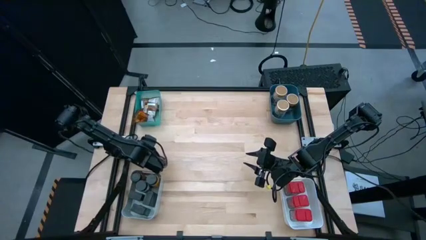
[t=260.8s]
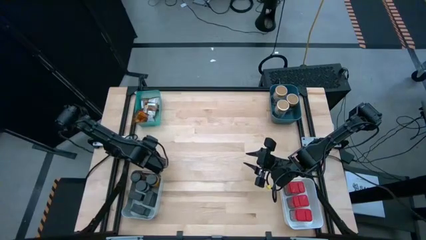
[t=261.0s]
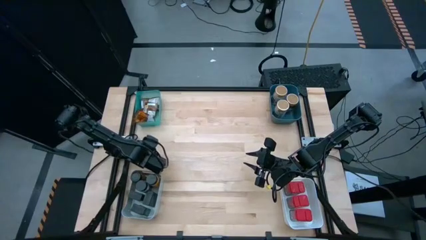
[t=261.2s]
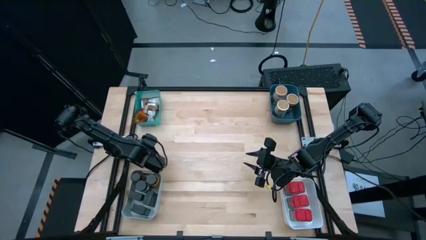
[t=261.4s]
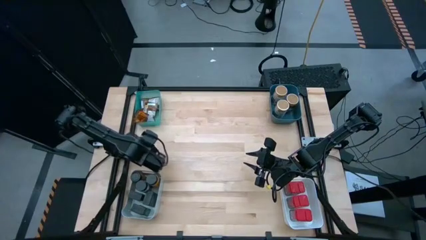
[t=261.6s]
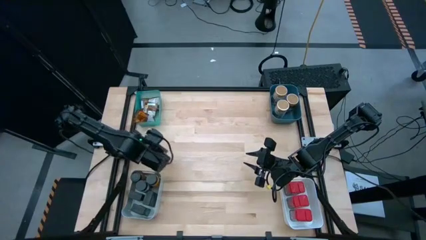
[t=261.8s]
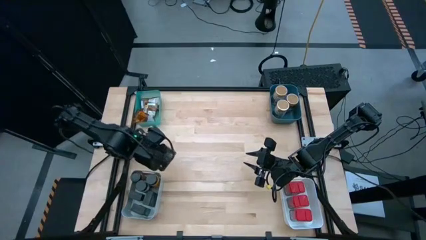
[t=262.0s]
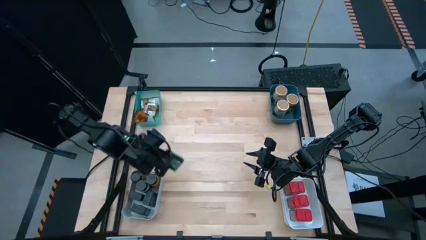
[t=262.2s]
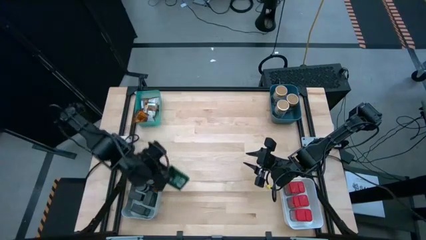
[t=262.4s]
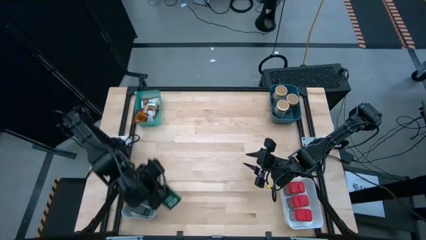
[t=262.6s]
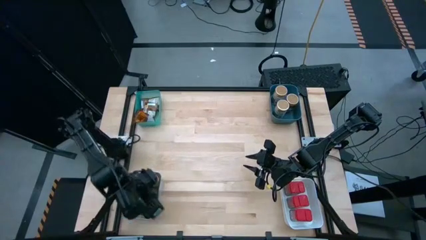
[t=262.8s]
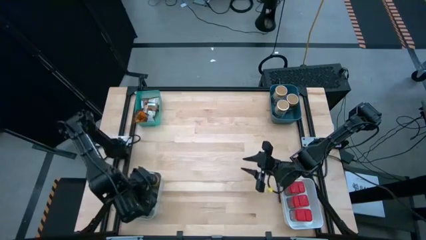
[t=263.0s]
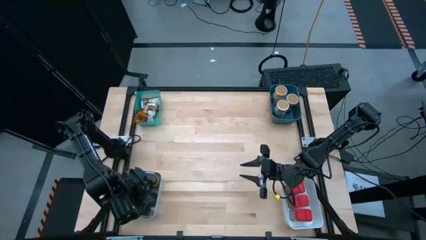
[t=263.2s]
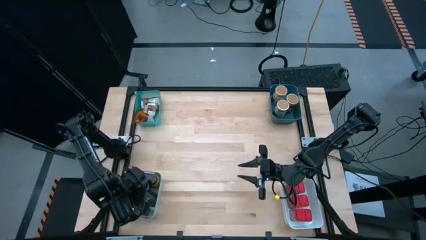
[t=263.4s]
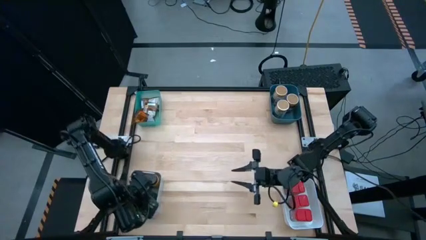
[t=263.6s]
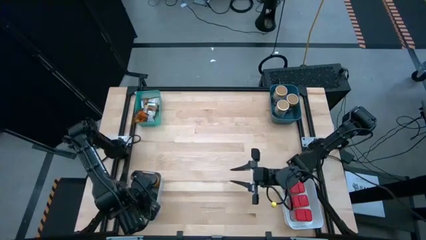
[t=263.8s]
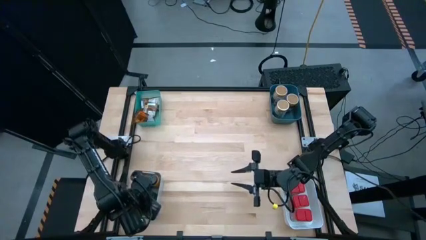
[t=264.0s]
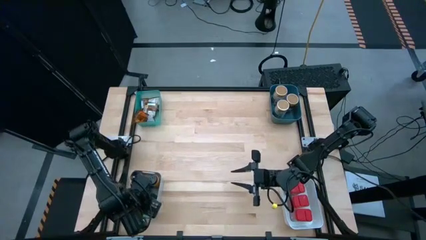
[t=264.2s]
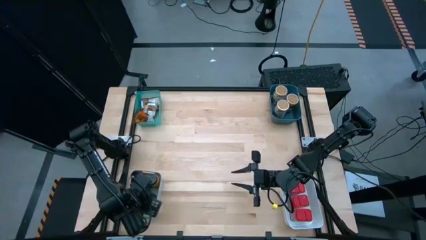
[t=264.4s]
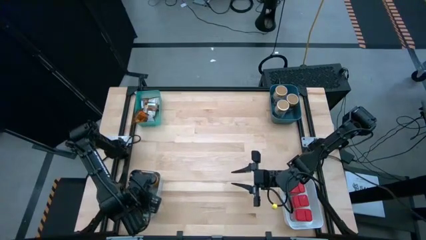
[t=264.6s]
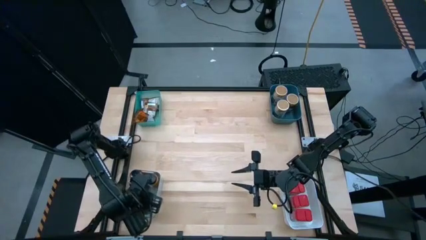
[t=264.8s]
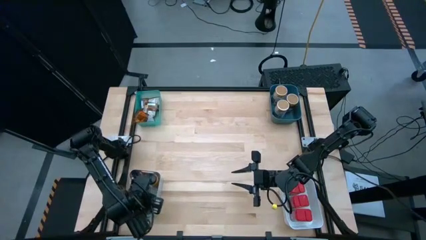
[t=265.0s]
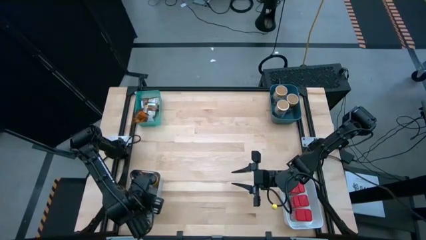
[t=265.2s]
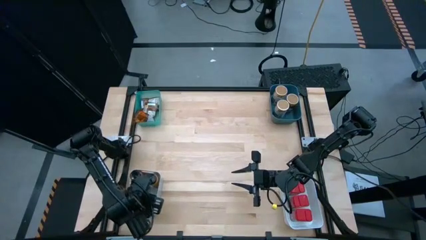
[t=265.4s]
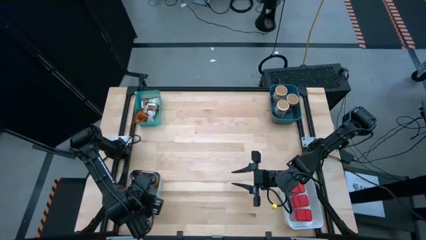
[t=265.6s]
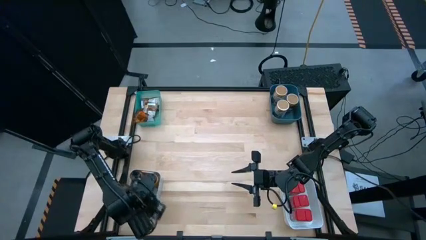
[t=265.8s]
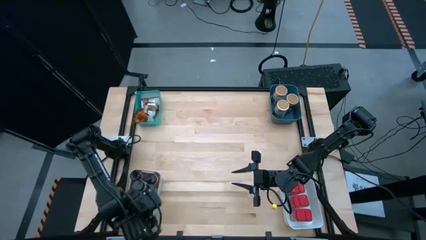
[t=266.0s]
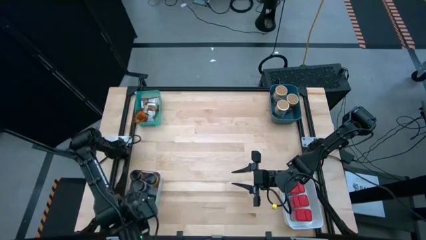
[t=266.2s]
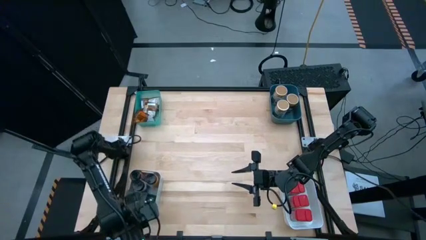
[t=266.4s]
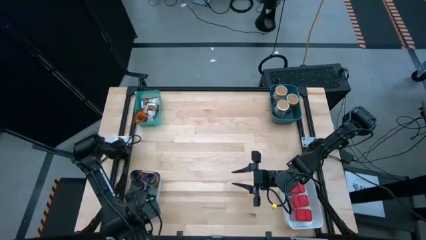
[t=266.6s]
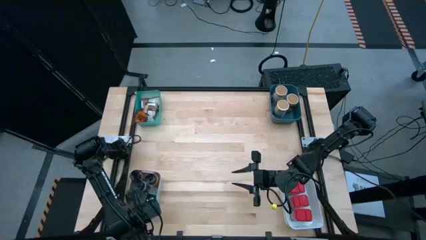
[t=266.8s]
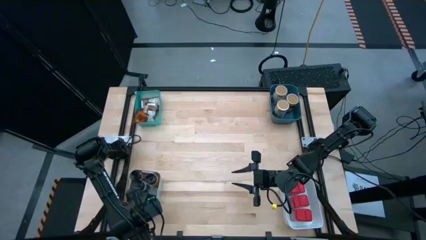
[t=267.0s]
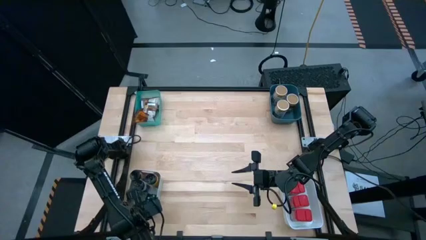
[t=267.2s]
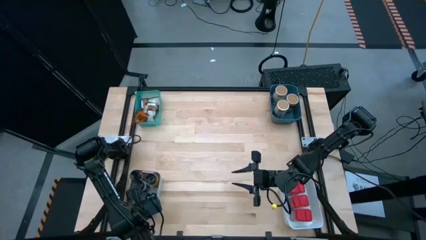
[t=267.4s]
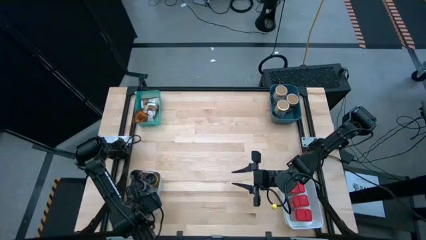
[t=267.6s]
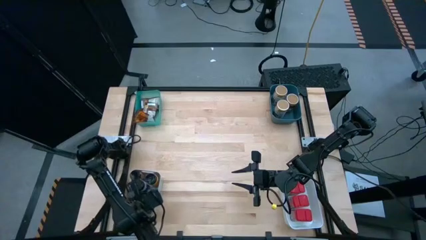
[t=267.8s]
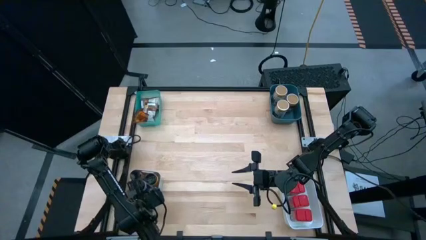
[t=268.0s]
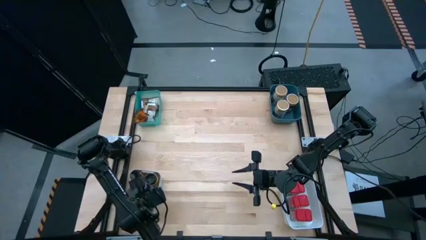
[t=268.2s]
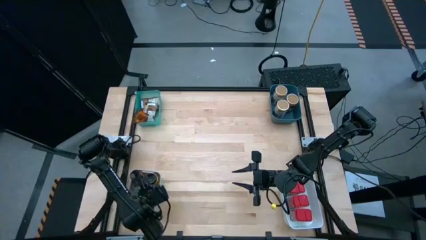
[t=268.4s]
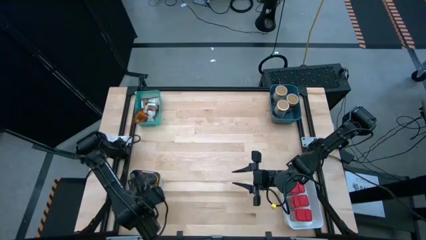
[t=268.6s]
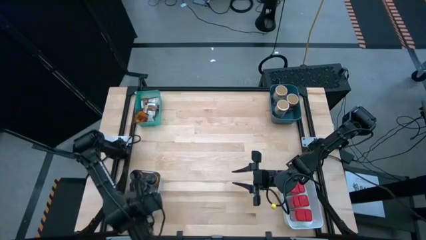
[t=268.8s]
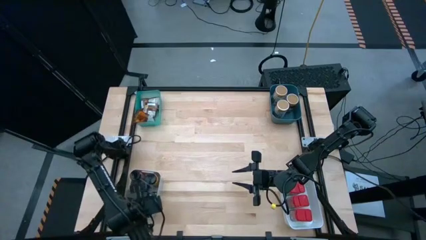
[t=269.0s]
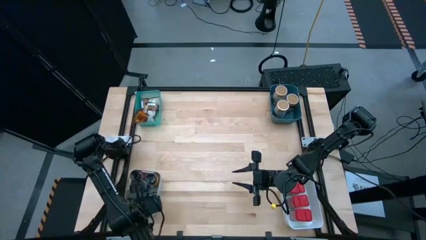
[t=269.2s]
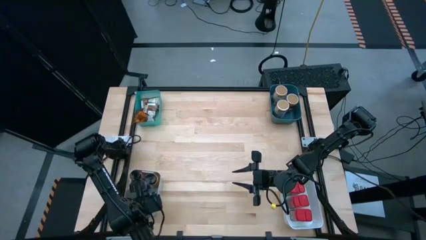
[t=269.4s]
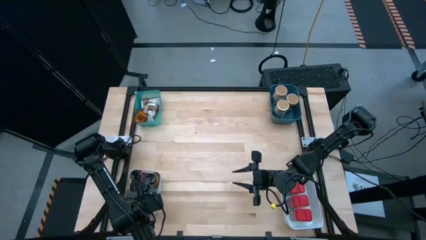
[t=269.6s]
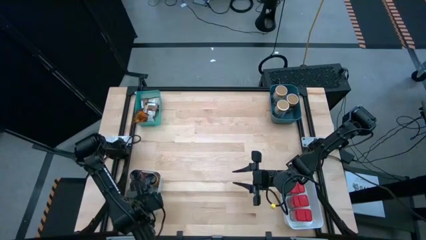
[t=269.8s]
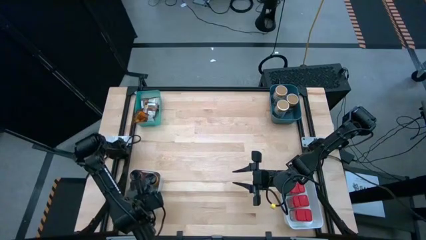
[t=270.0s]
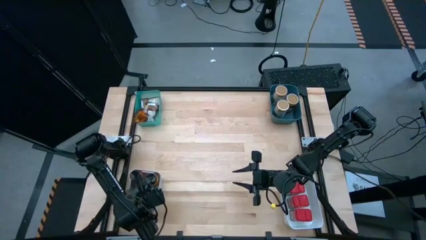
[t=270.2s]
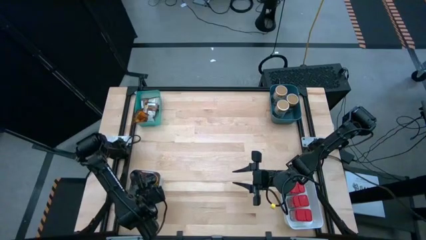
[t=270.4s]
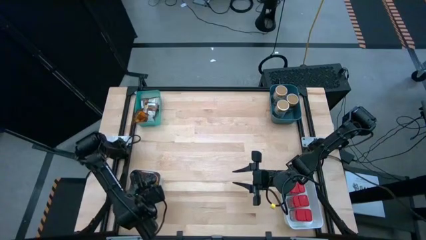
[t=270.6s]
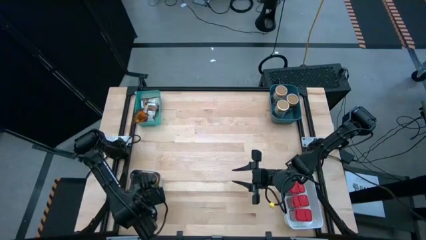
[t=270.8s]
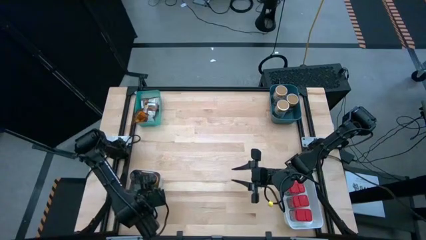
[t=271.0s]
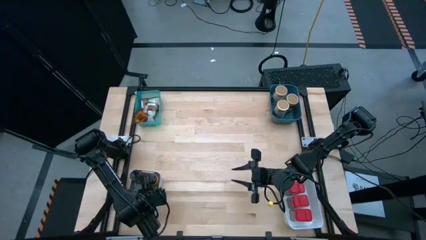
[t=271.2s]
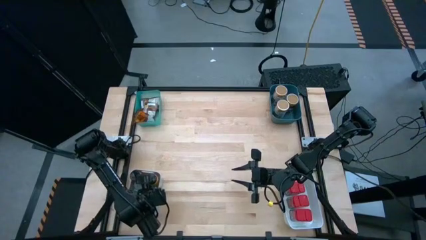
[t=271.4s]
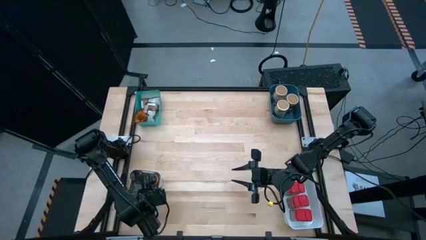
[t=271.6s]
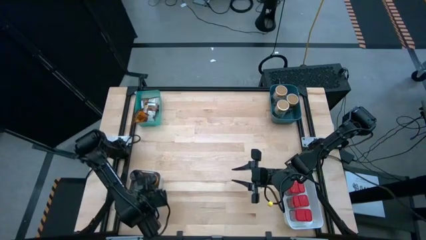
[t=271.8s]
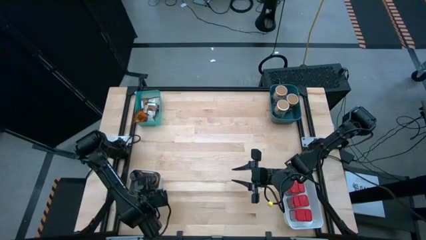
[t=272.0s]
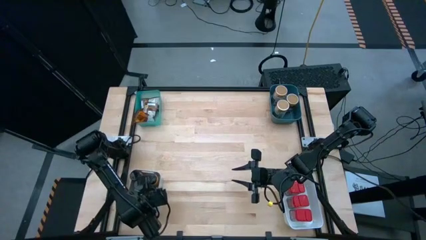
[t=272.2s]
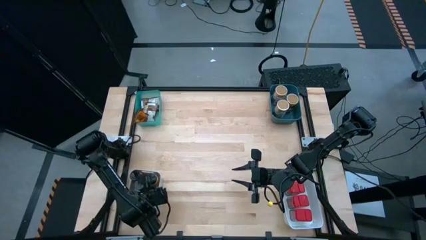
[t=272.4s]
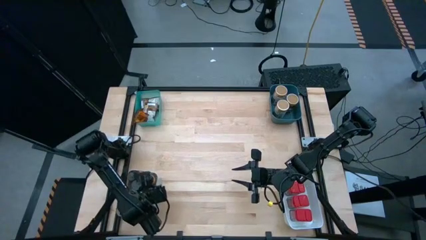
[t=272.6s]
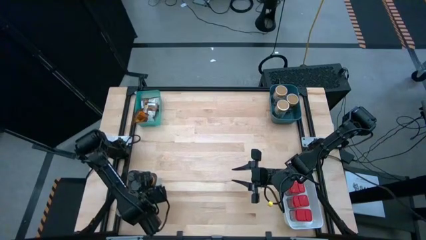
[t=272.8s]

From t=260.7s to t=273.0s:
Task: Sort spices by type
Put the black seasoning can into the gray bin

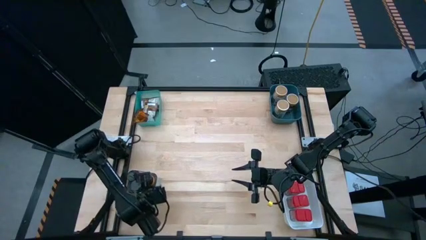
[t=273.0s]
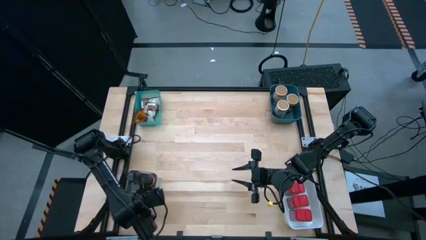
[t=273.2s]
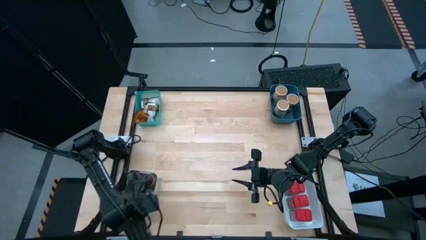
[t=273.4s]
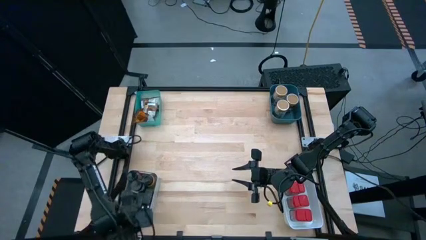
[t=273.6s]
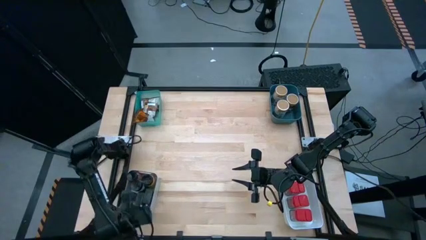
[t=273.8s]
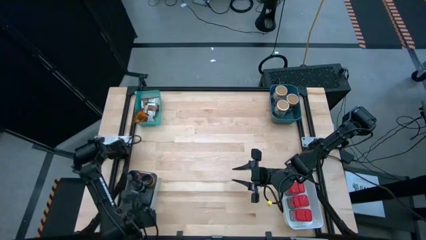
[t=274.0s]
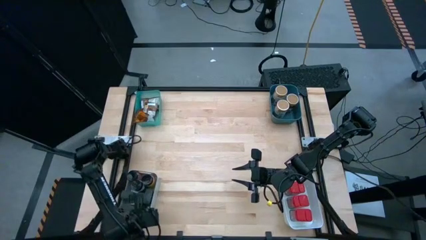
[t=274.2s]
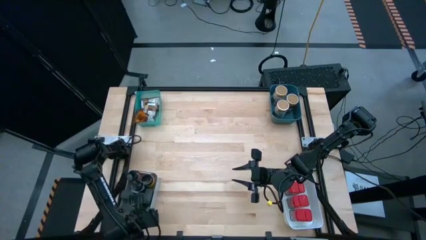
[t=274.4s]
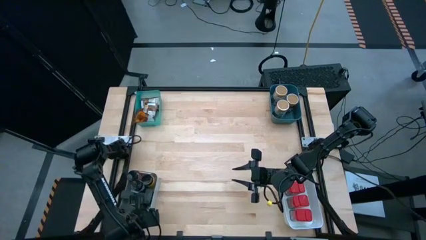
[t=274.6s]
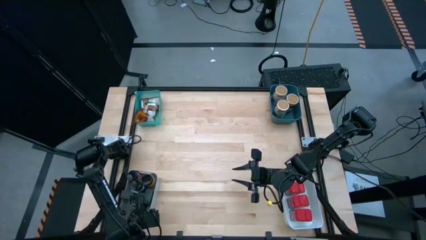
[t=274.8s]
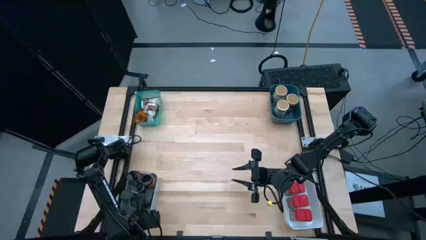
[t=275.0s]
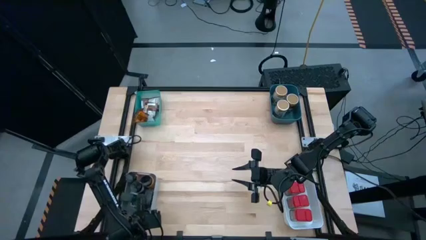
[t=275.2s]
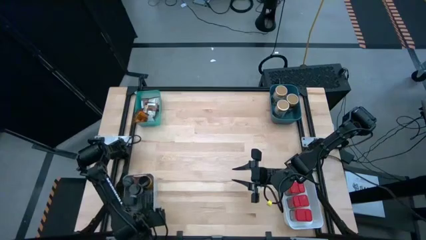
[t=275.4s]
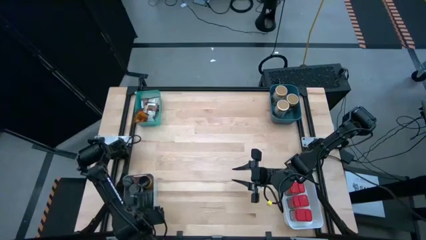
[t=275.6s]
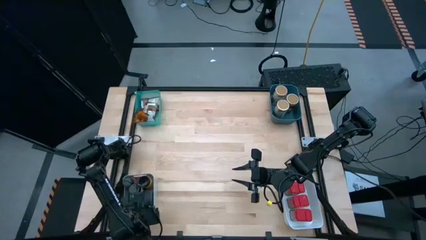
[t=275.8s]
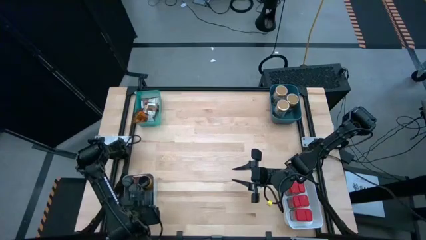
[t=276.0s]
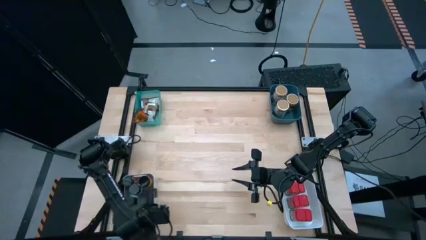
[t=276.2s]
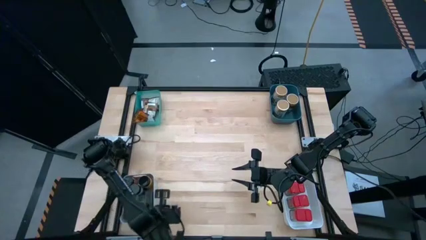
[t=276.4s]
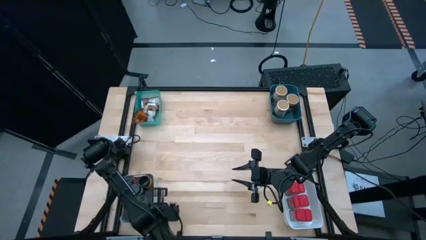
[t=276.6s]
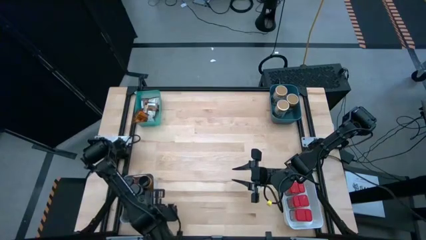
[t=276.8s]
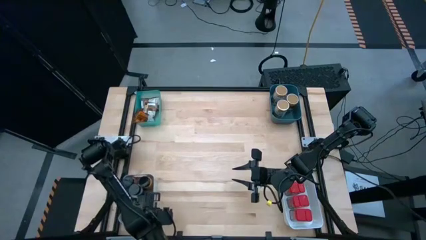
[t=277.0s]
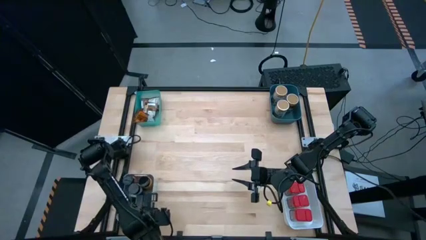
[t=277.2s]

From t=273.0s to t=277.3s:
Adjust the gray bin
